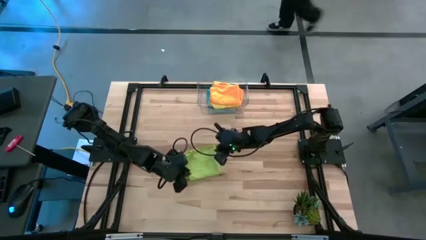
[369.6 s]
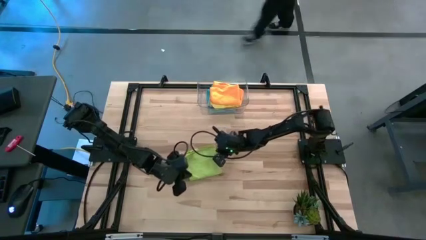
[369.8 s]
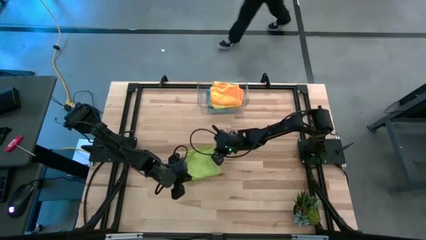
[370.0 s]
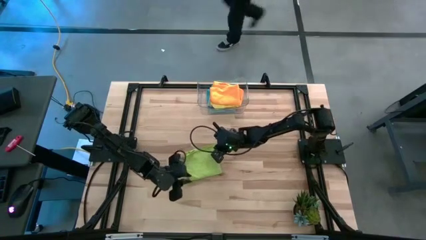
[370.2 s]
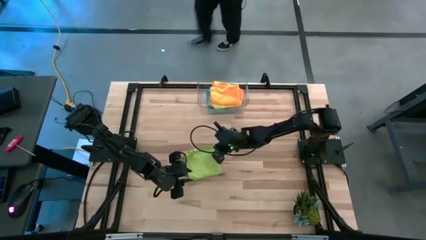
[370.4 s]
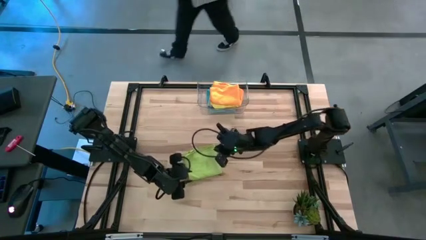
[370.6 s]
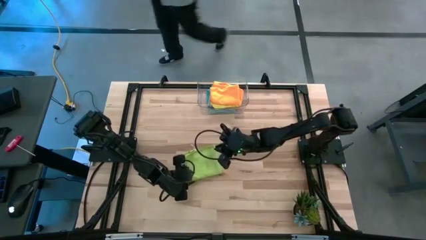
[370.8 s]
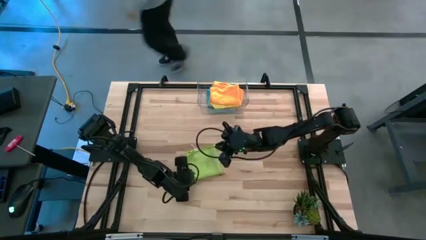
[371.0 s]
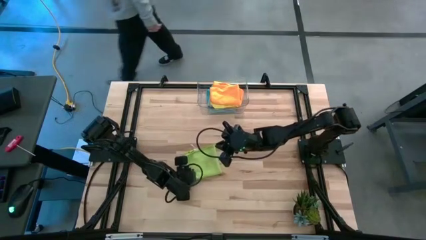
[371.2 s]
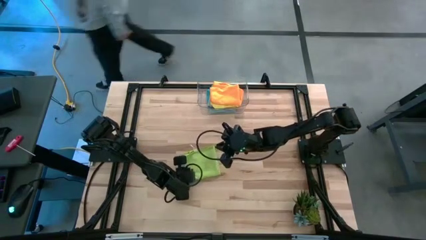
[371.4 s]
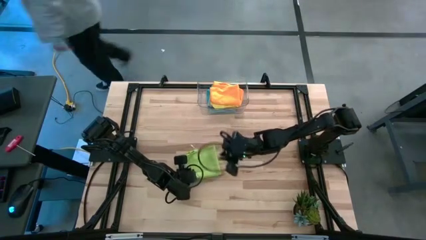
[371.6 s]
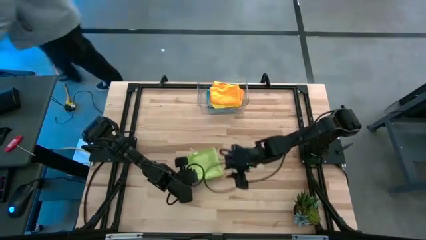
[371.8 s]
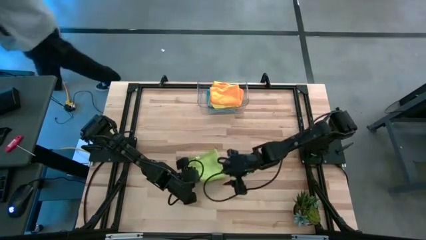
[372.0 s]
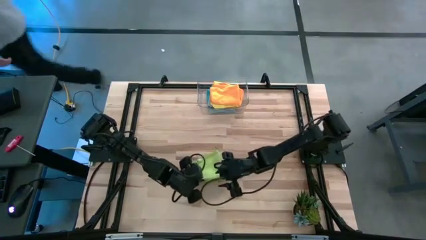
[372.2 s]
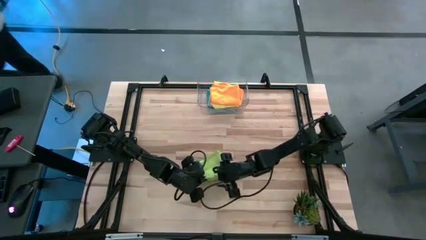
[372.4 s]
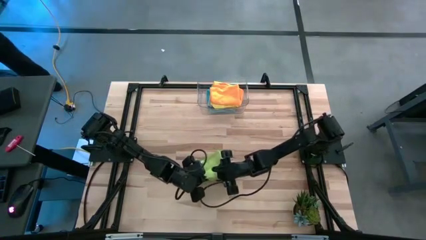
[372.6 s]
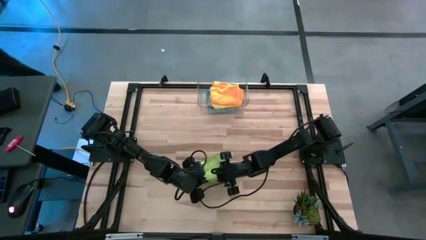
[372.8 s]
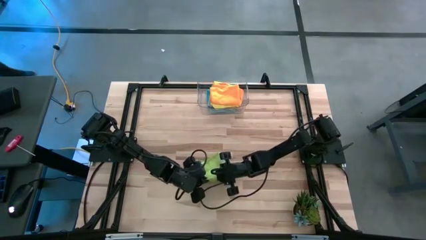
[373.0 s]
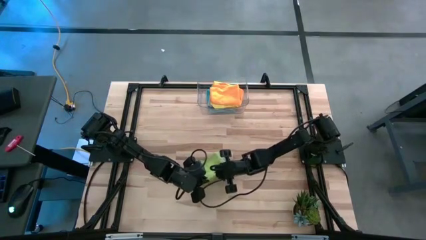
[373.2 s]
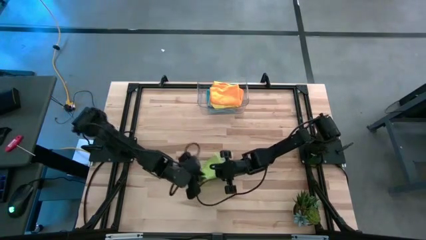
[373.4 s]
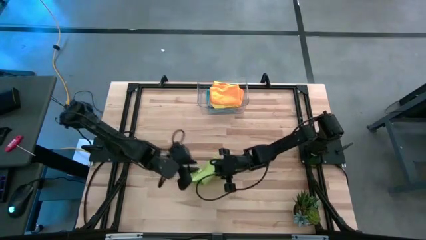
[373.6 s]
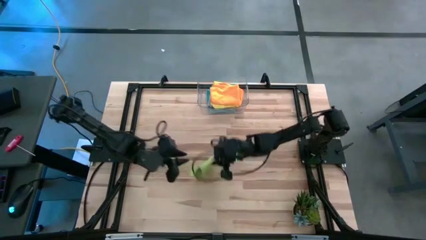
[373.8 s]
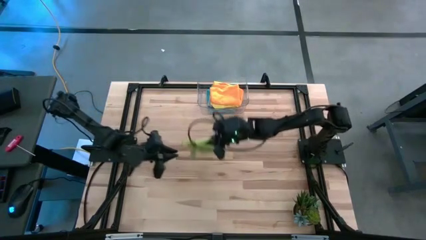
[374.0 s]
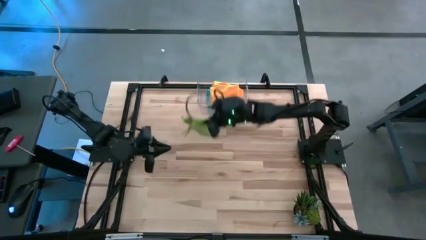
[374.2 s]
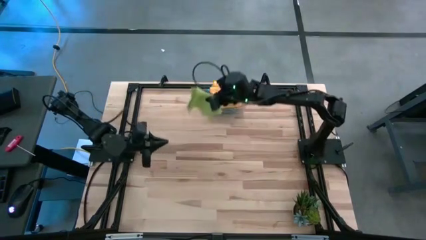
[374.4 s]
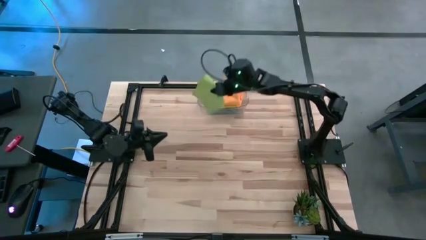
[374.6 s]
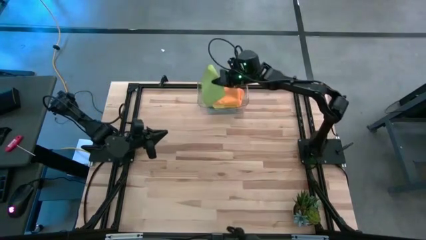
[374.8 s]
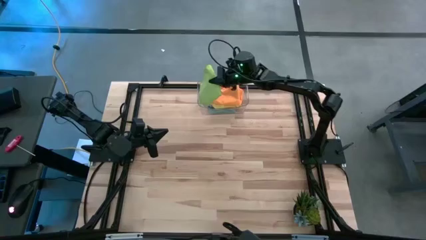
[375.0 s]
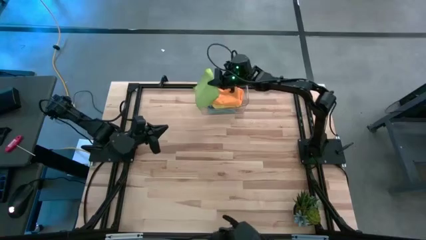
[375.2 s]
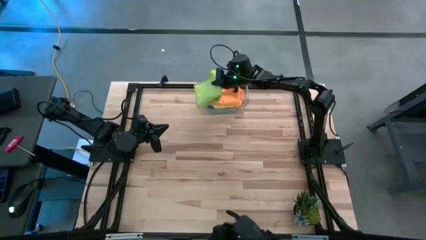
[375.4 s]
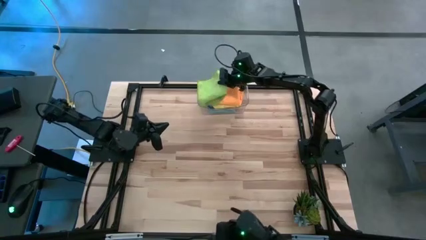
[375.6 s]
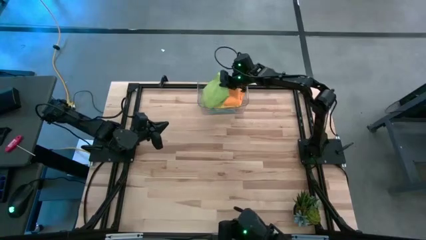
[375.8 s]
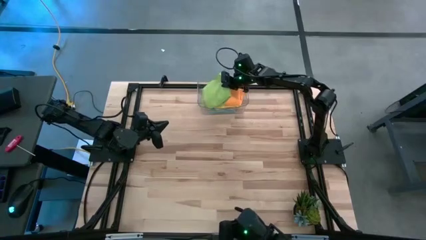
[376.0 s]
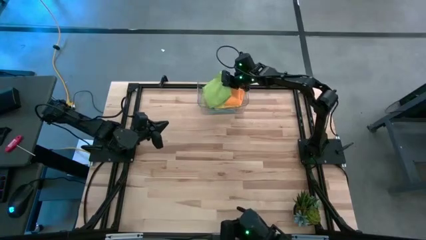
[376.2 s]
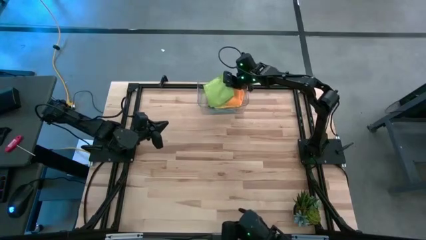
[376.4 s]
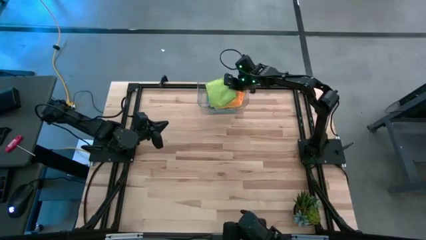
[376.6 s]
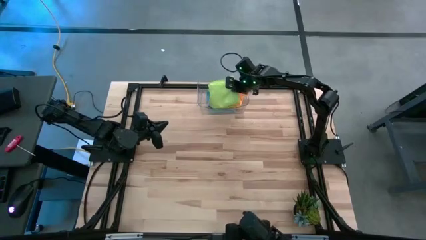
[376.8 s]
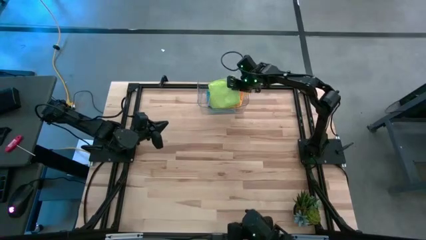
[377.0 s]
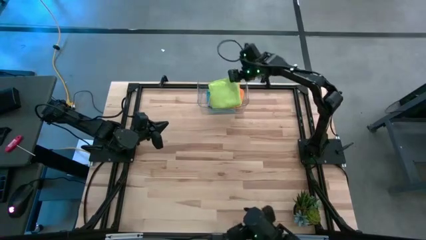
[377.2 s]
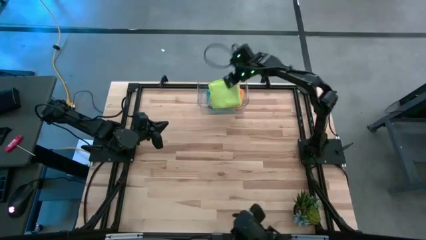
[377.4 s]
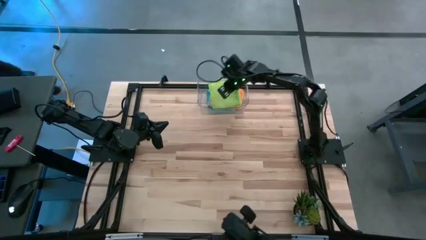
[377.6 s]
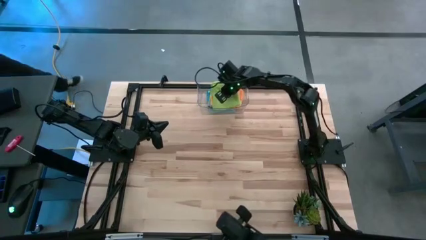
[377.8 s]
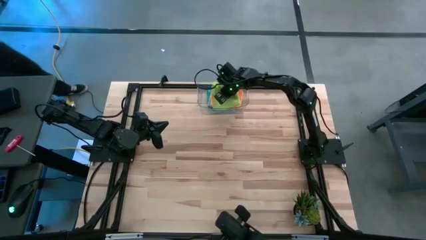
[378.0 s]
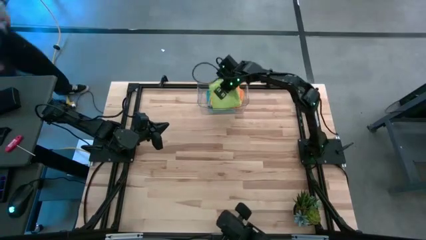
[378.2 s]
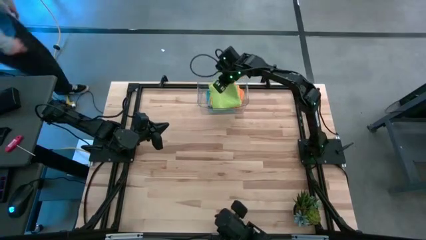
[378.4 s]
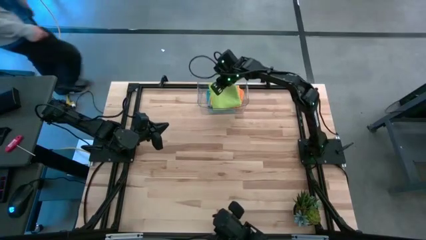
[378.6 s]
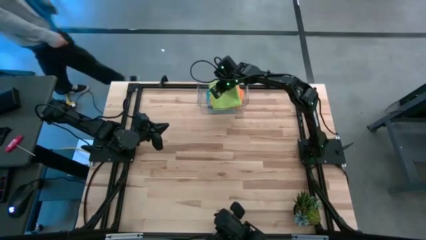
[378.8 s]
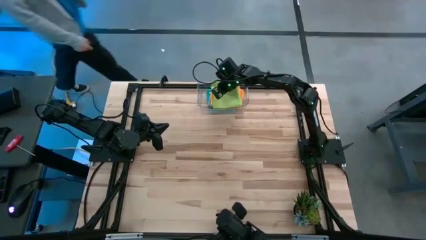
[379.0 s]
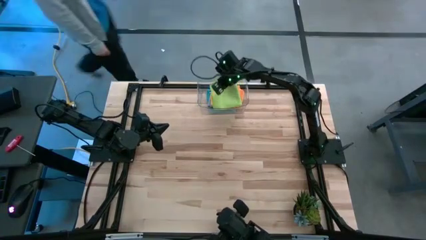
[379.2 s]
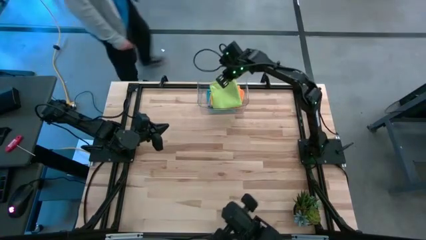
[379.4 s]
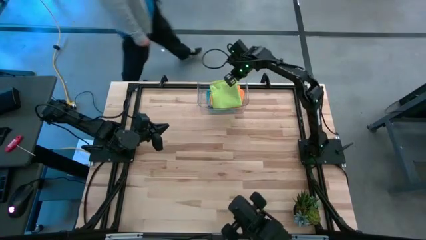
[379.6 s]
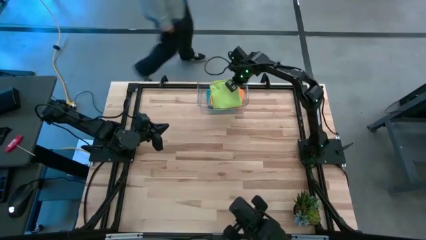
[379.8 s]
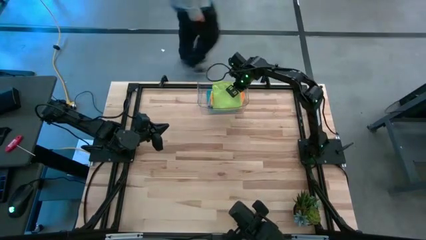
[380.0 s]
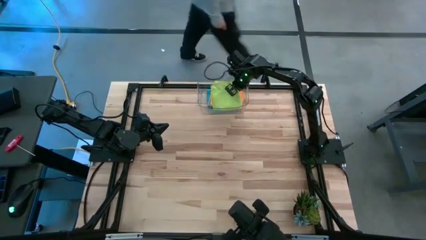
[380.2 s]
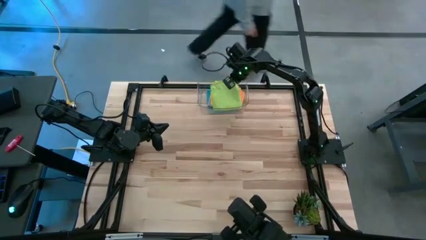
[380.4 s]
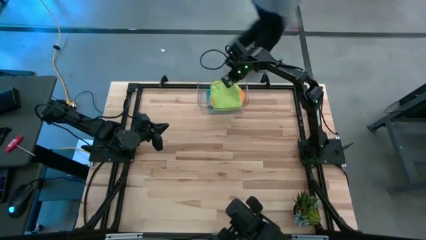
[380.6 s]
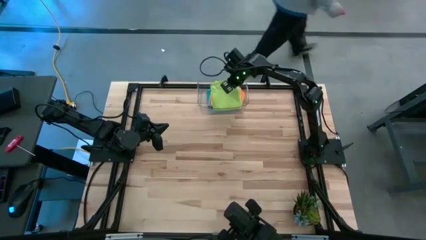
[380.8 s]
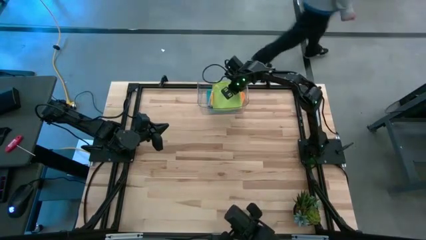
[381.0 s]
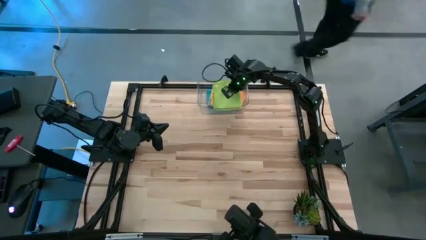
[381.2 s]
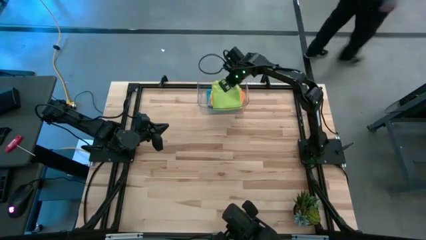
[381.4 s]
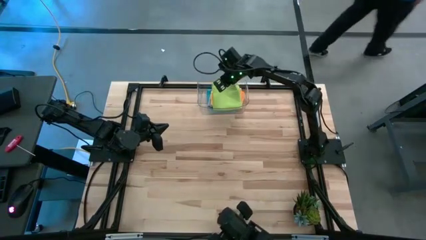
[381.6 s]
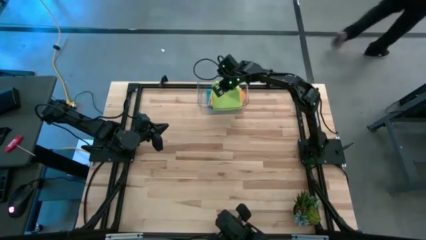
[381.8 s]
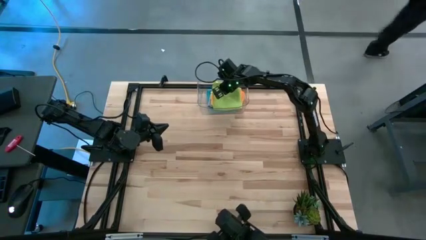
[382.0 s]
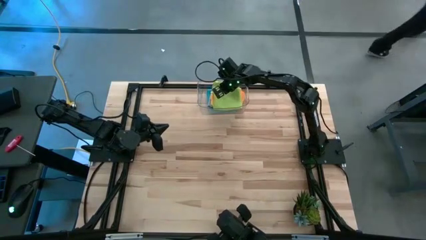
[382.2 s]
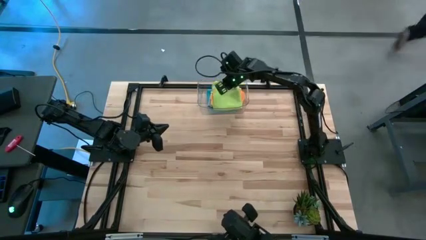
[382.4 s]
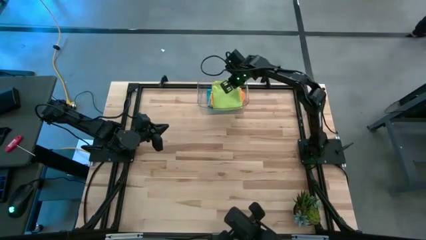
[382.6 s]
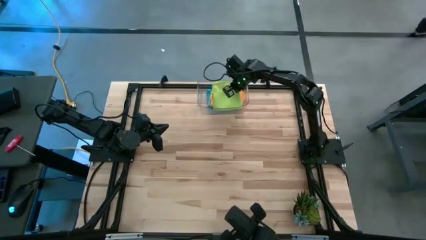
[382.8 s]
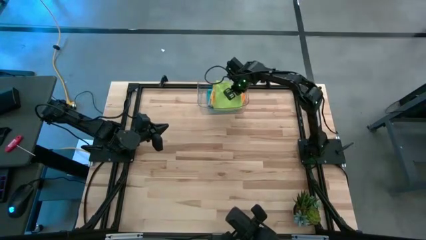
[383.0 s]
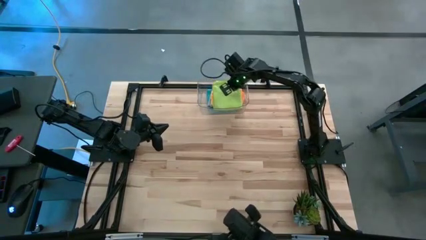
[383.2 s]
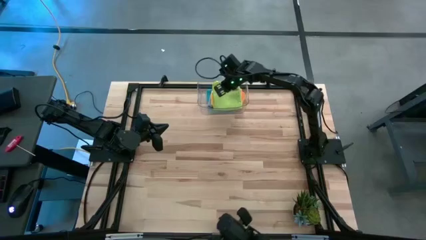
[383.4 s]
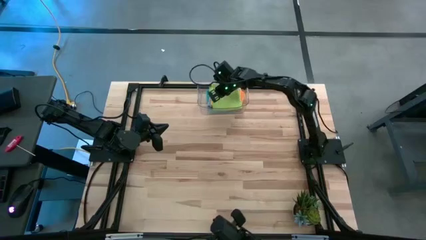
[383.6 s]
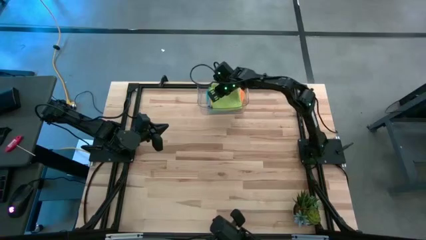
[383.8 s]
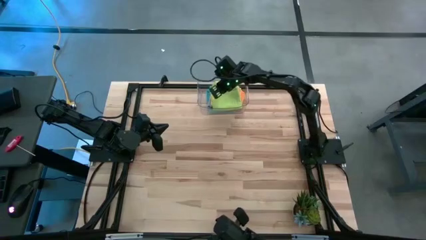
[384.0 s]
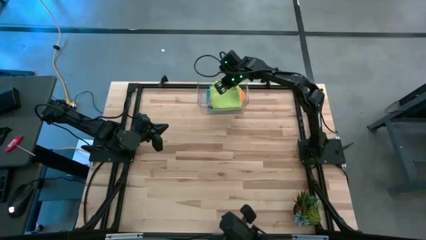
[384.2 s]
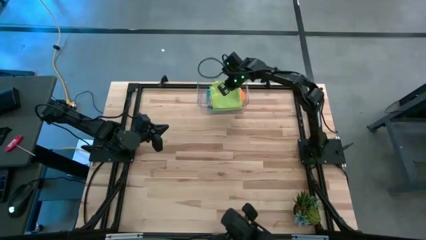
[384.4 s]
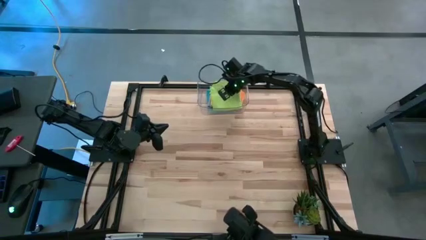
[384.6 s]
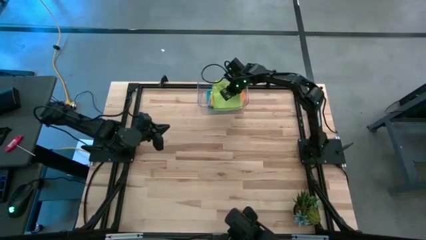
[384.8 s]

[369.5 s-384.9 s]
Task: Fold microfiber towels
Put the green towel into the transparent bin

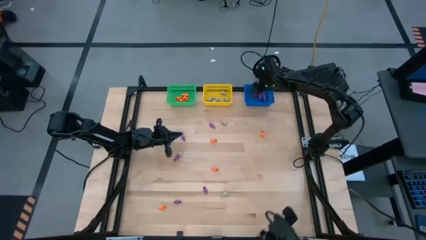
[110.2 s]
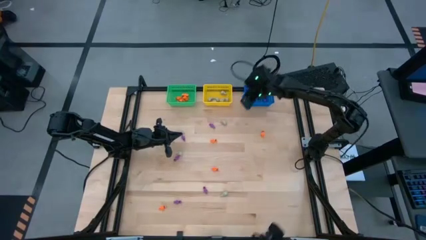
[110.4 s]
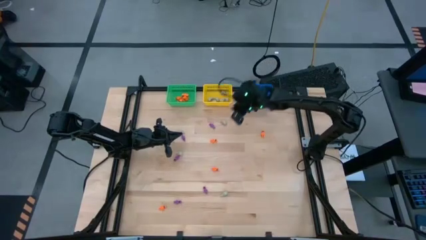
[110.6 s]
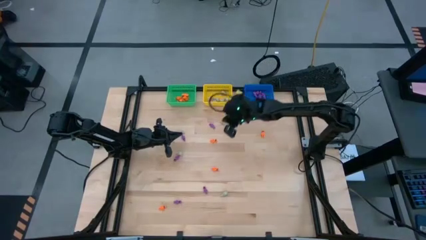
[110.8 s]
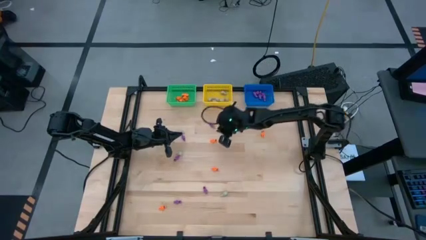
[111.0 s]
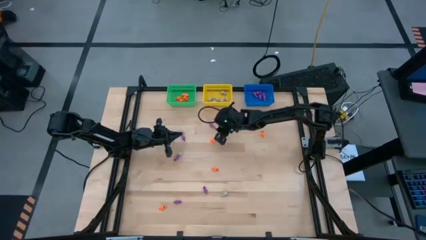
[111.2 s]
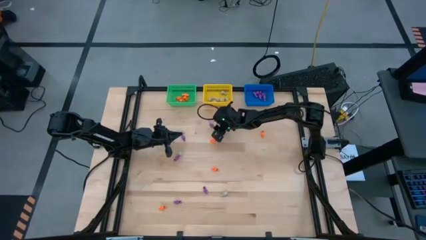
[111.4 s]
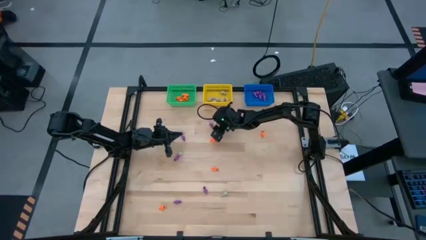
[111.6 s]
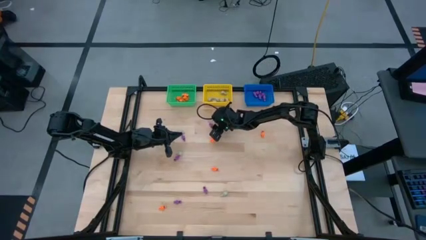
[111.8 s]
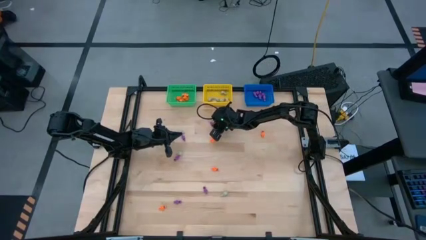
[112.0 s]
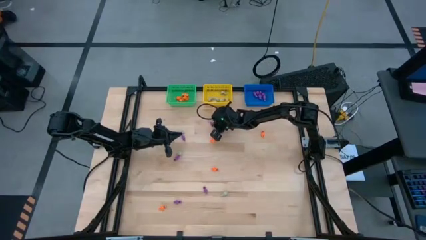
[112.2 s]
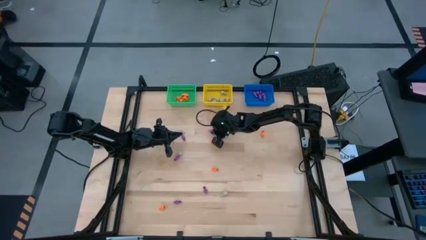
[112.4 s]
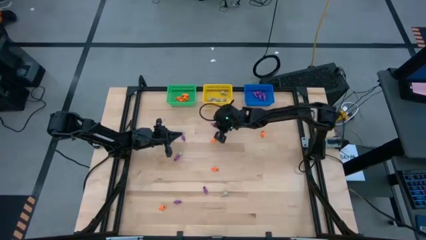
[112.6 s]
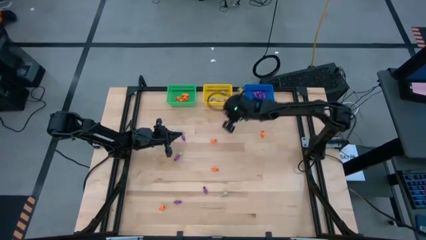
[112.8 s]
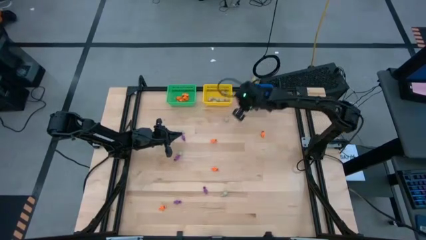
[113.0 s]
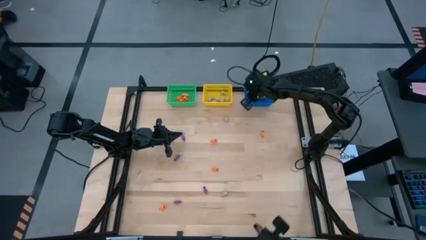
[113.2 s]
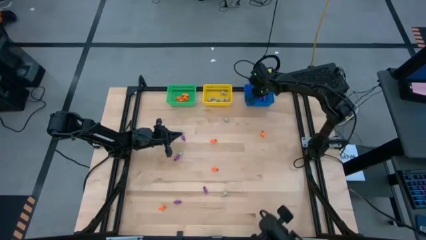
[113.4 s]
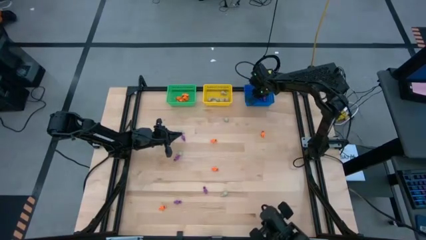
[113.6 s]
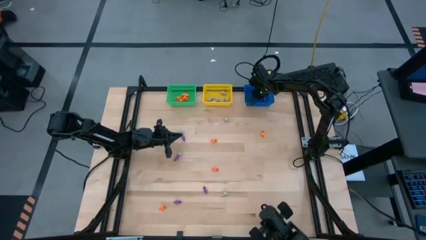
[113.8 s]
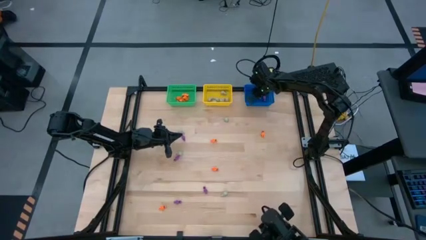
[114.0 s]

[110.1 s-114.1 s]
Task: Sort Halloween decoration
Put the violet skeleton toy into the blue bin
